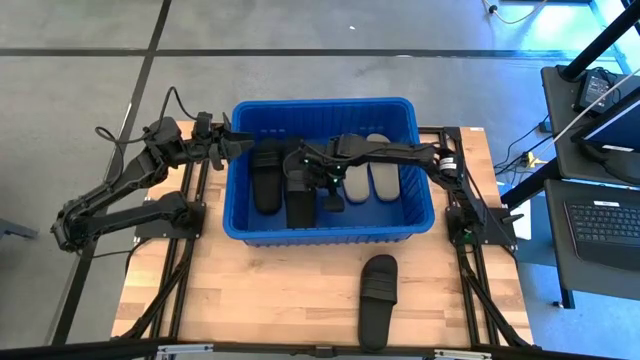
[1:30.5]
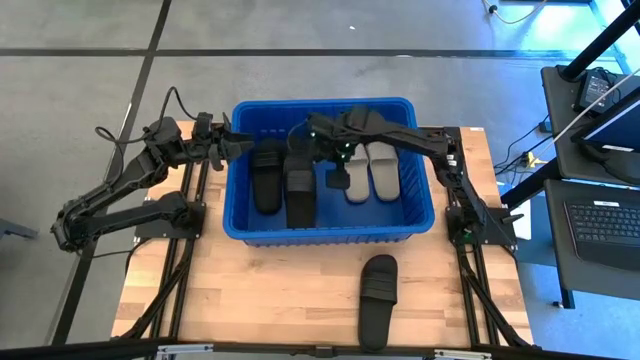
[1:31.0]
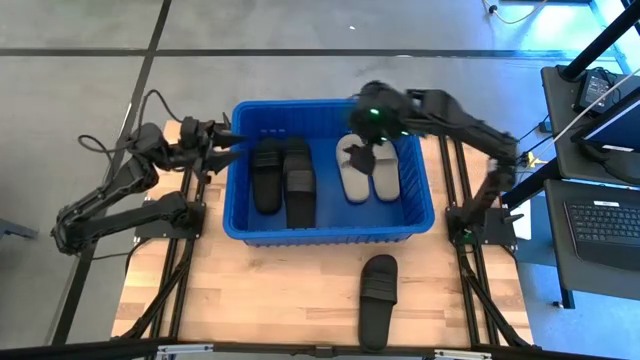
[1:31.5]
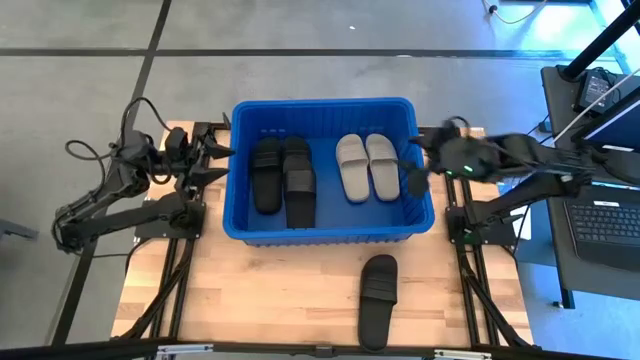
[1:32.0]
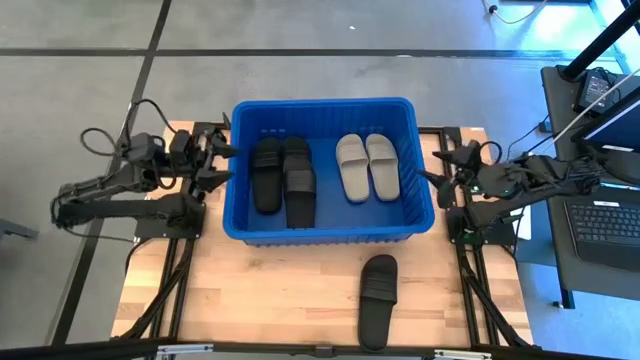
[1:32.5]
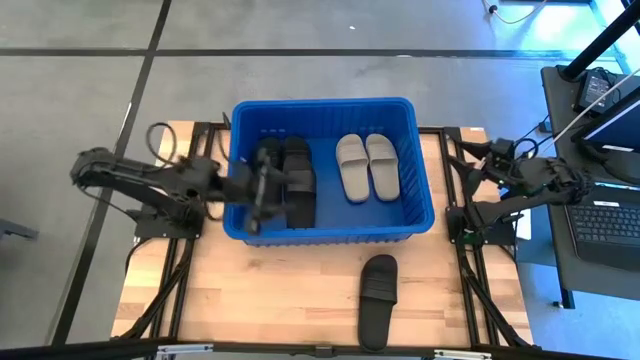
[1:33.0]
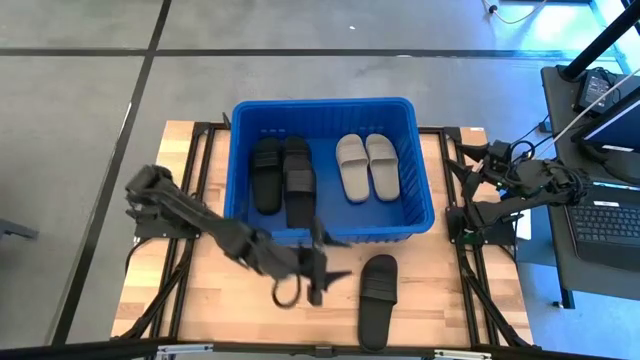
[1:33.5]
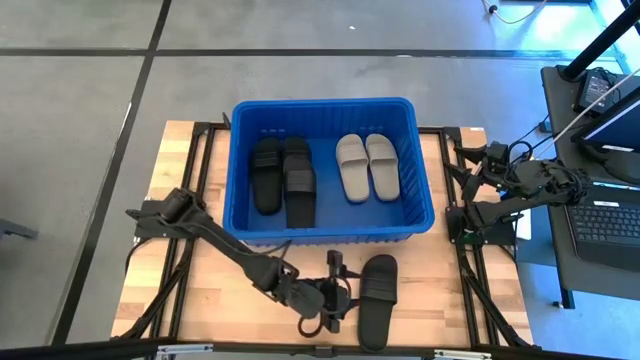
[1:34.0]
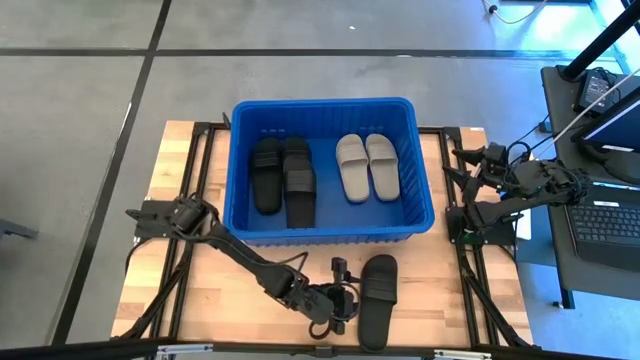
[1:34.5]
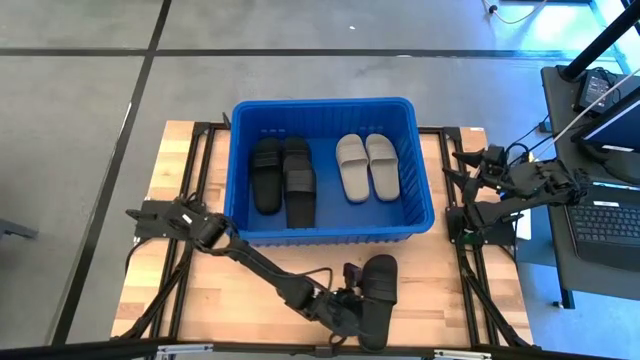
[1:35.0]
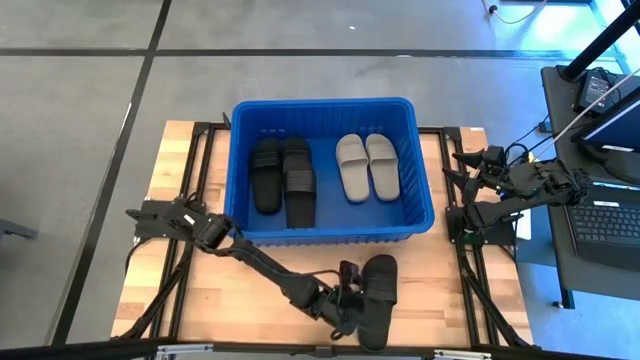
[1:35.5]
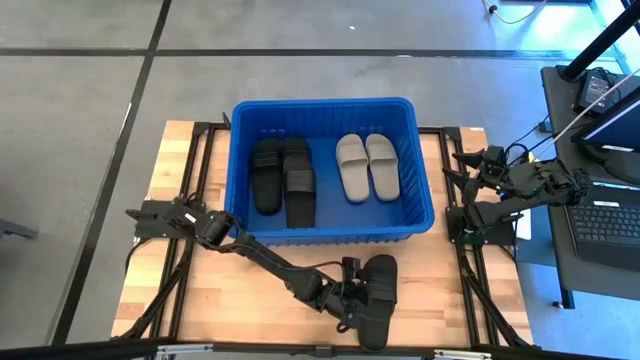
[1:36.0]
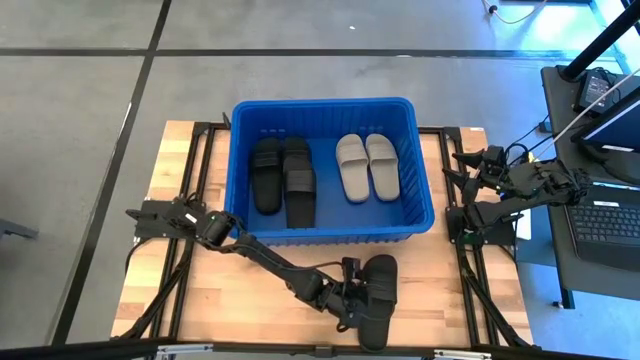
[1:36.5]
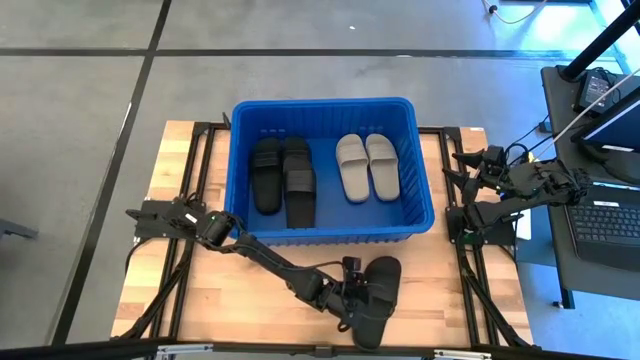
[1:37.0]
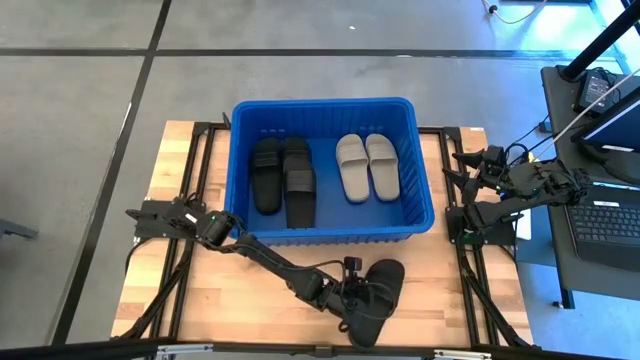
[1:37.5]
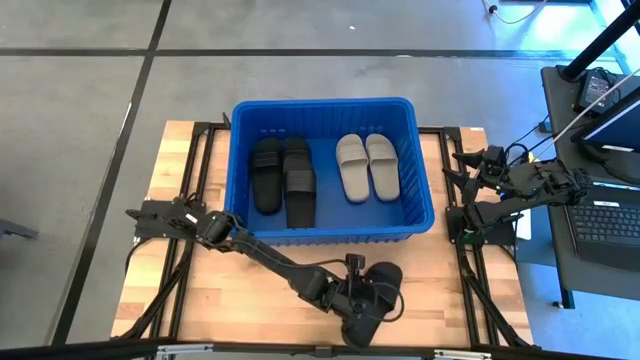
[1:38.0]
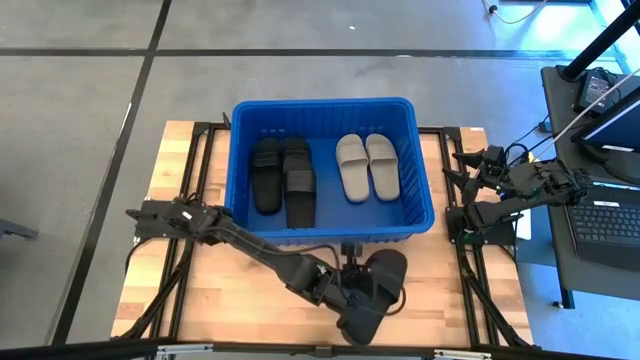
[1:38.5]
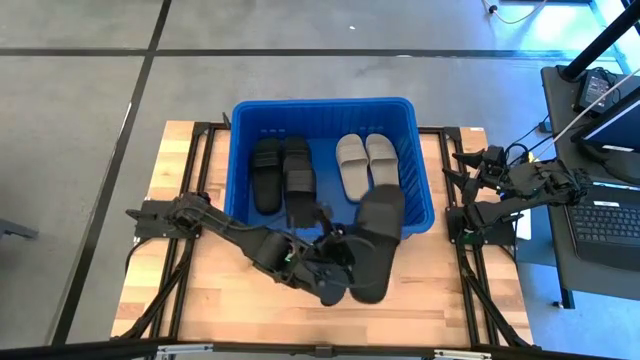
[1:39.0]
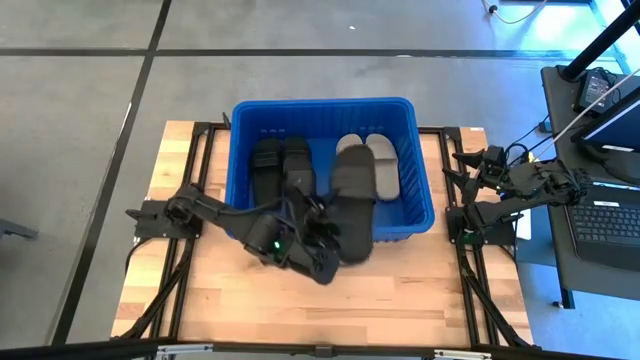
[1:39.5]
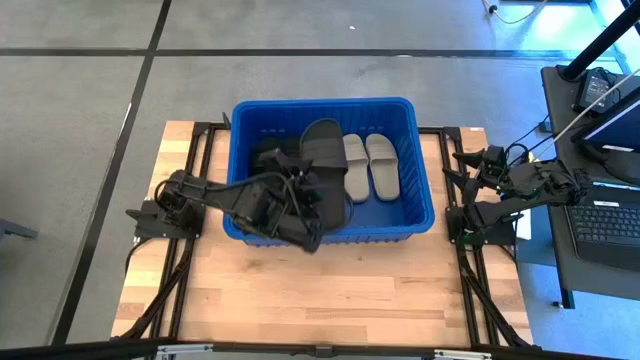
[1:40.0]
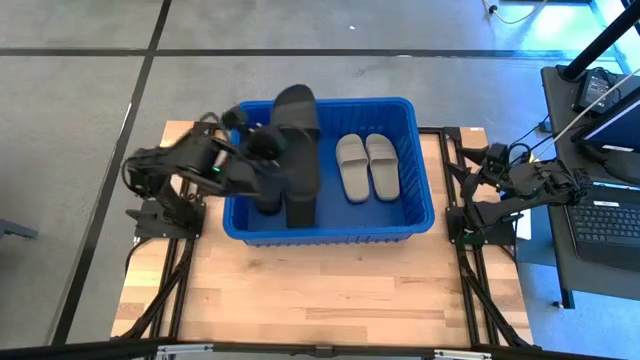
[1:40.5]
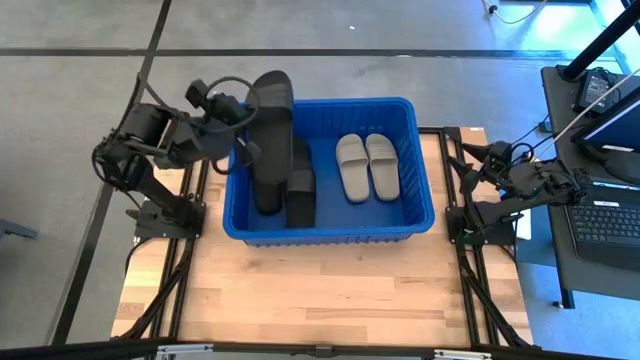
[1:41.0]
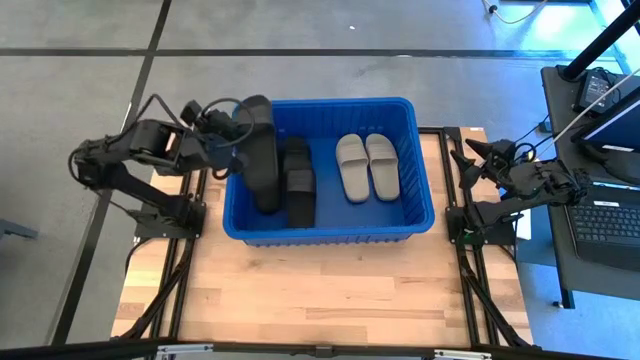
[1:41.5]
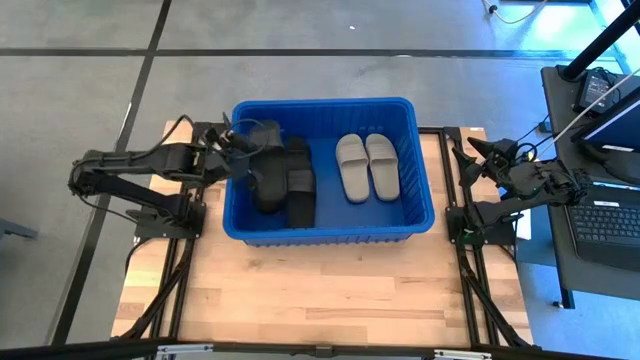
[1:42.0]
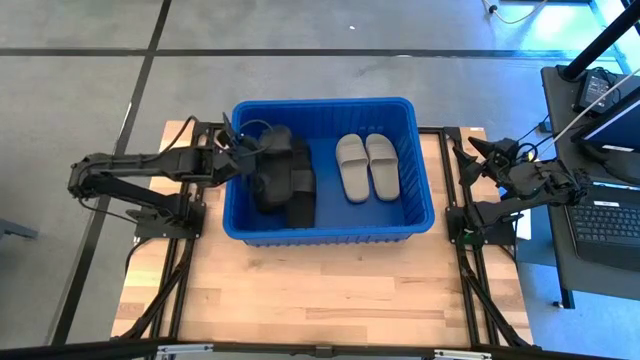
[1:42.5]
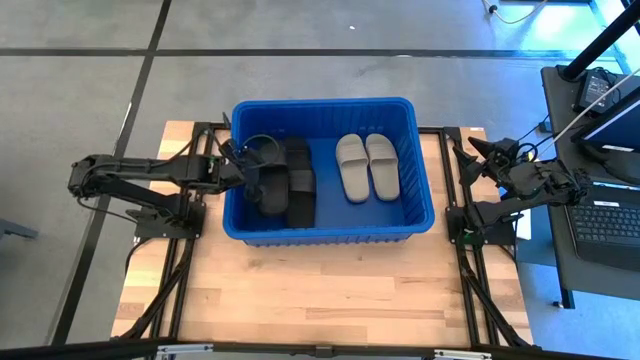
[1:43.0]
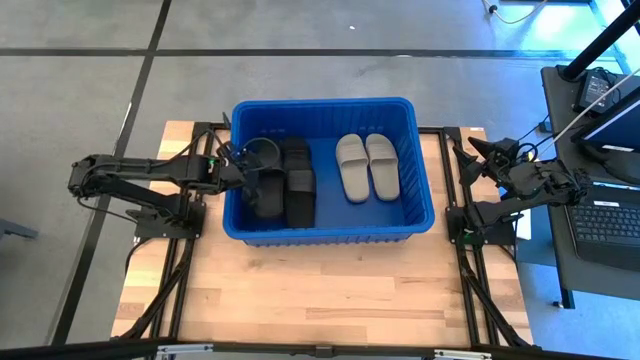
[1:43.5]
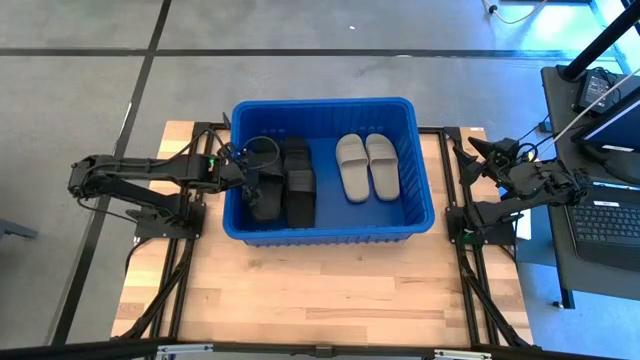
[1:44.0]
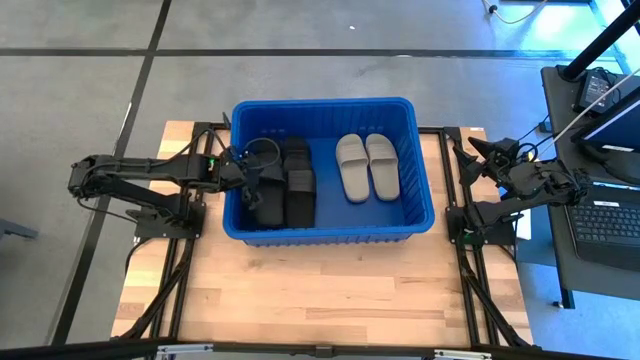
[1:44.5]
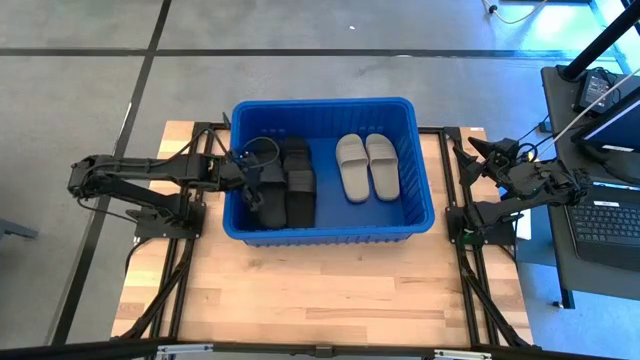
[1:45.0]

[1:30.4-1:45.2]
Task: Pick and place slides into bin
Put the black slipper into the blue container

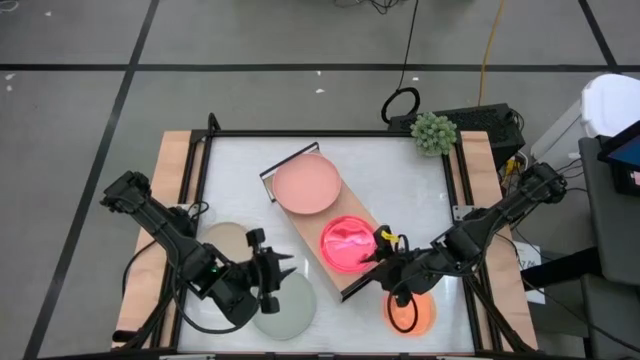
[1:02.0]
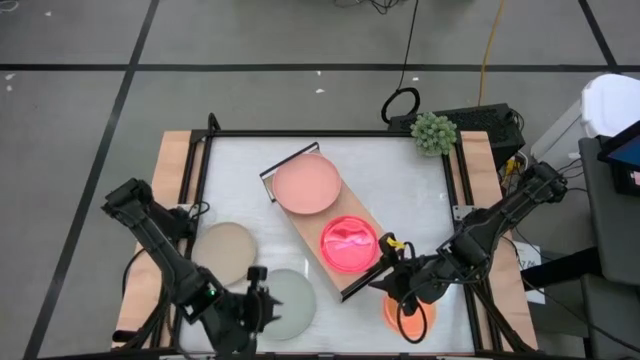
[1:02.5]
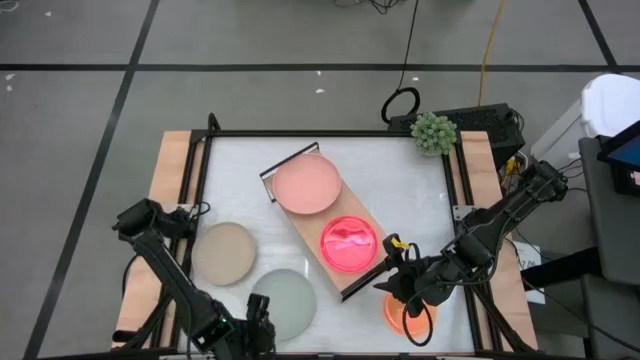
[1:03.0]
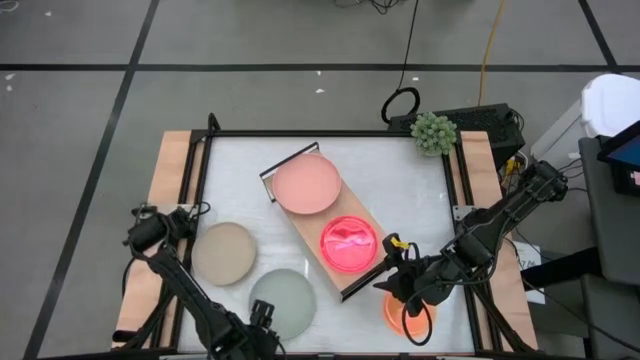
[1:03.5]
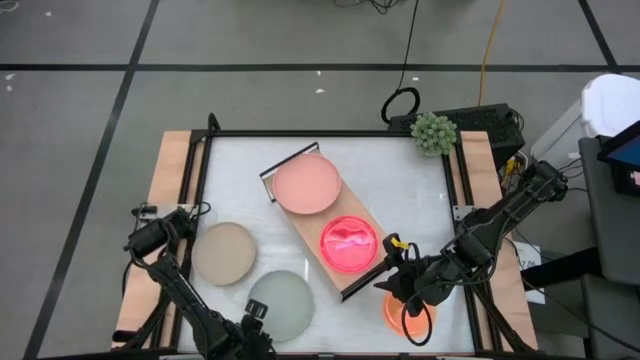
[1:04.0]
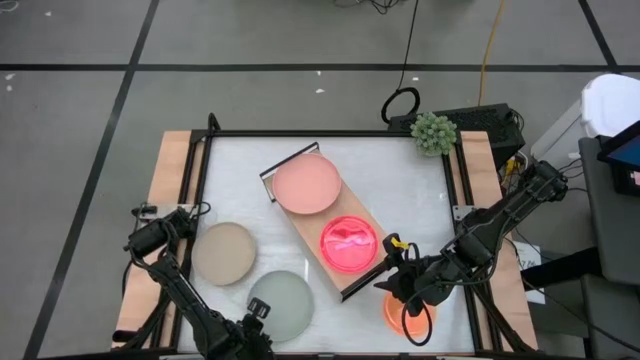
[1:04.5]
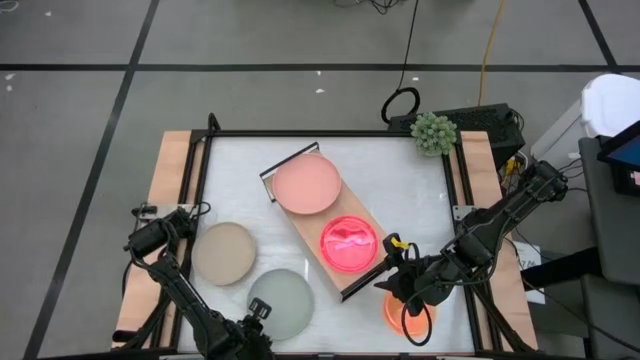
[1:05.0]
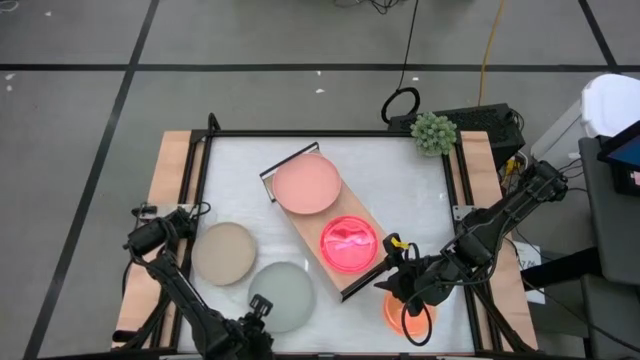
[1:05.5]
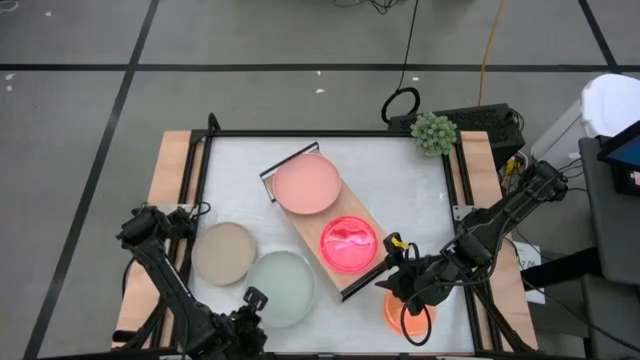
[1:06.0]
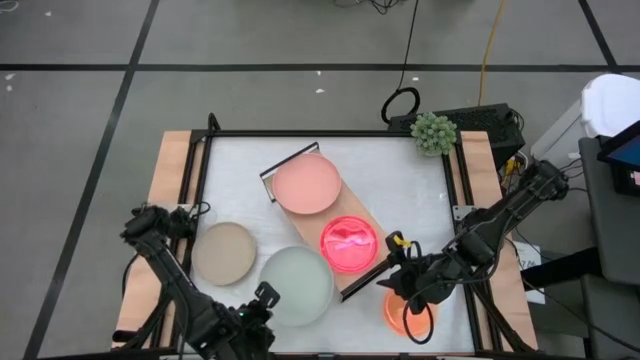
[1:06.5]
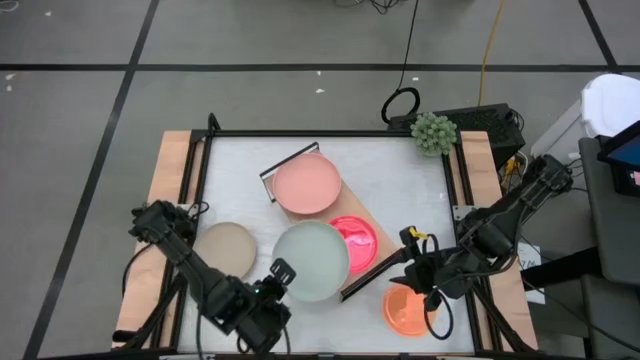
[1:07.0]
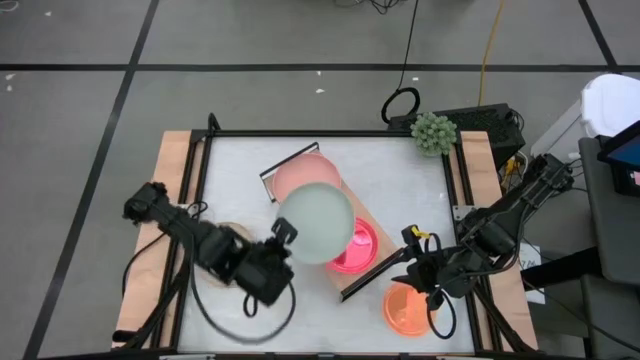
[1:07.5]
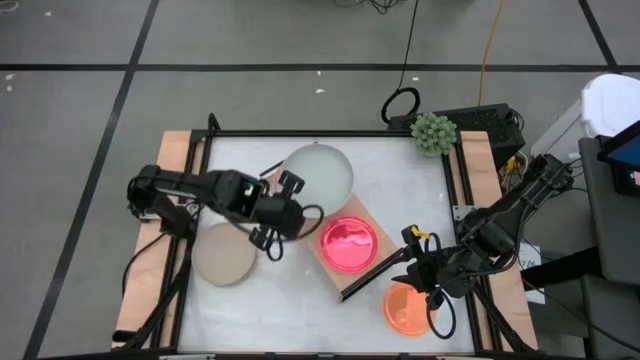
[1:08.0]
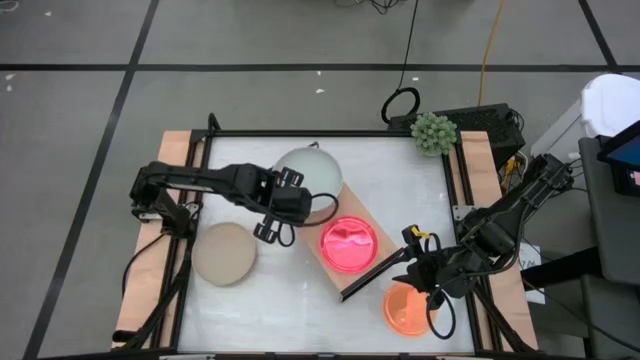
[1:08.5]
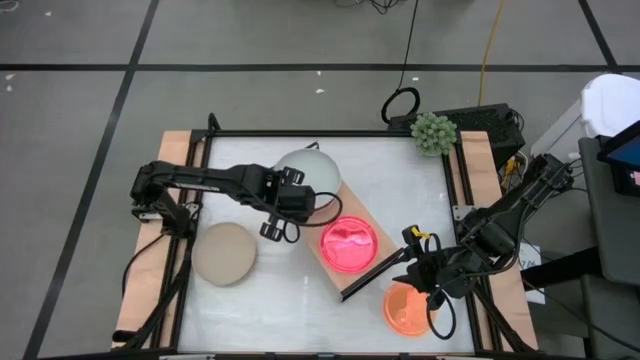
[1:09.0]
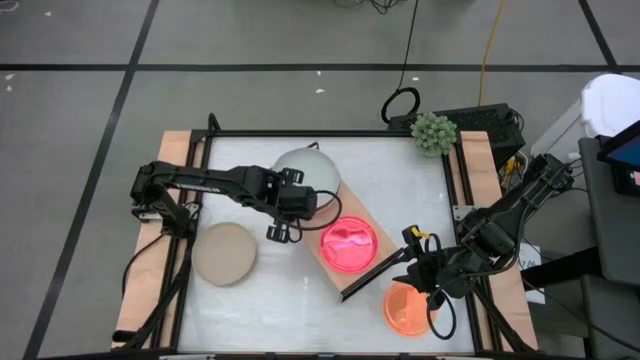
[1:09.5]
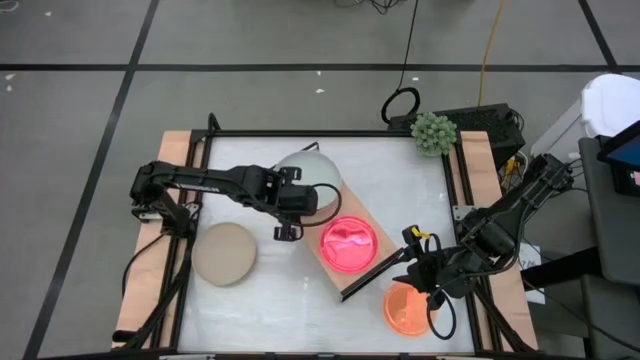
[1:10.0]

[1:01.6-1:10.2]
Task: Place and stack plates onto a shelf
Stack the large gray plate on top of the large pink plate on the shelf
